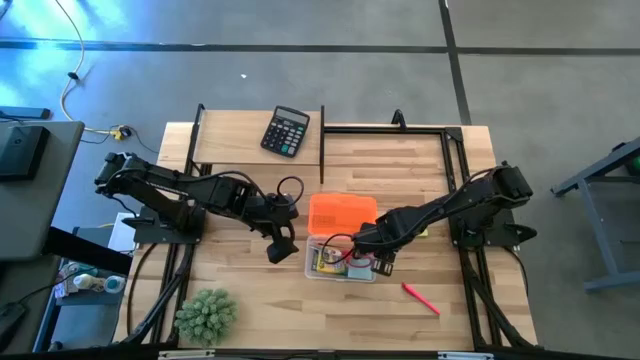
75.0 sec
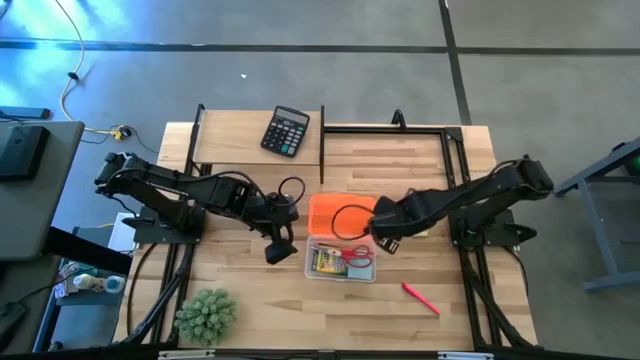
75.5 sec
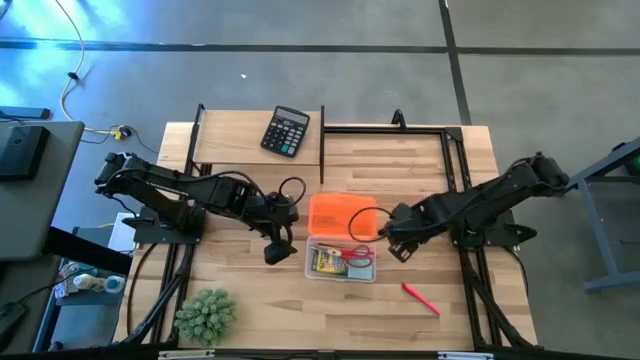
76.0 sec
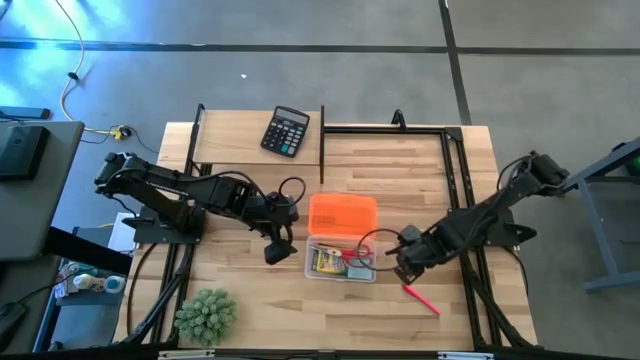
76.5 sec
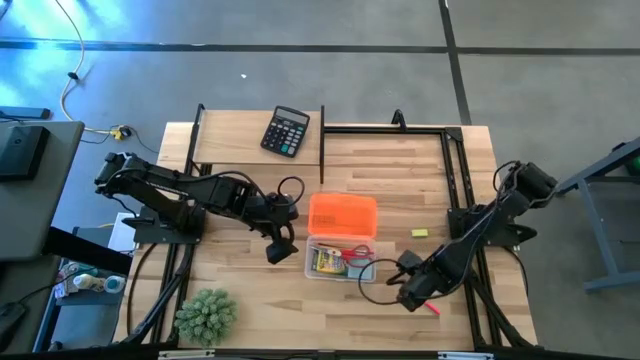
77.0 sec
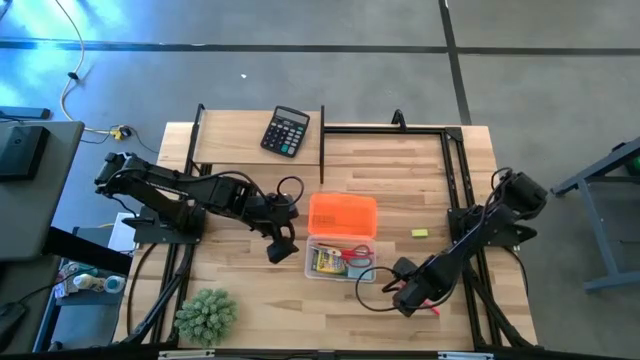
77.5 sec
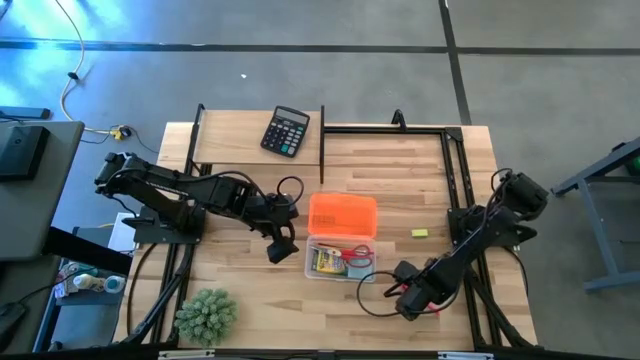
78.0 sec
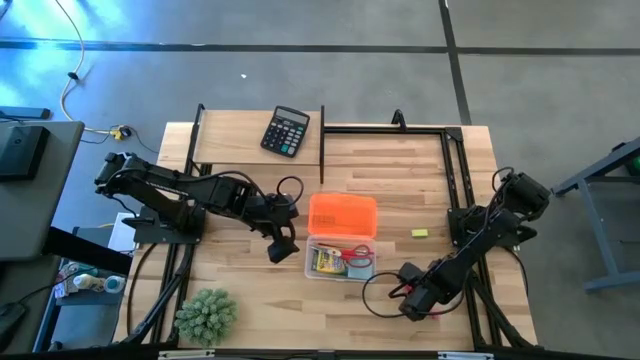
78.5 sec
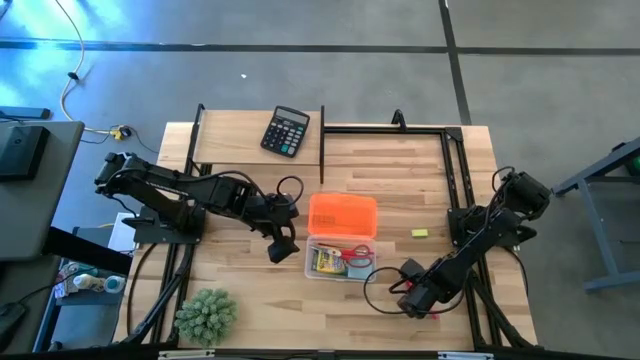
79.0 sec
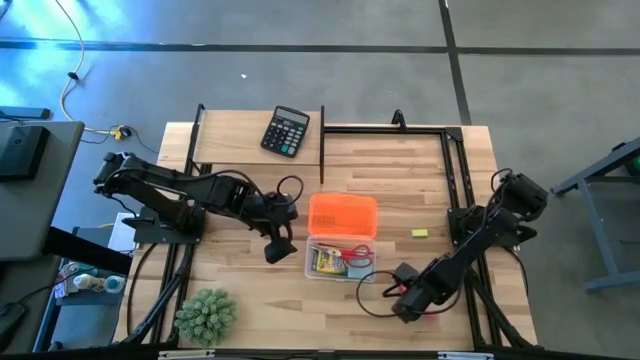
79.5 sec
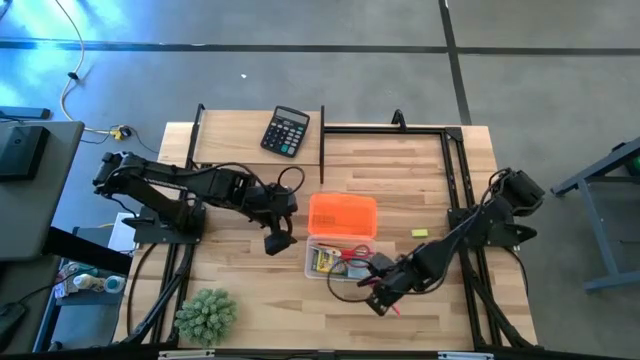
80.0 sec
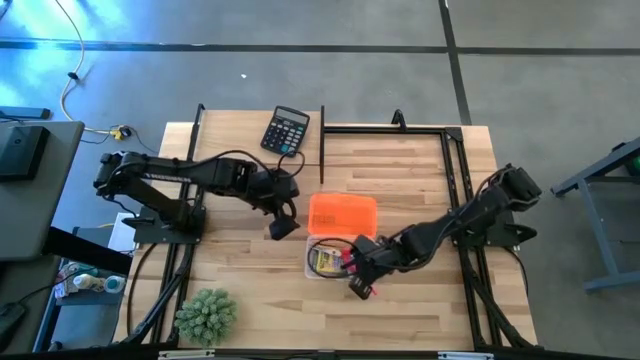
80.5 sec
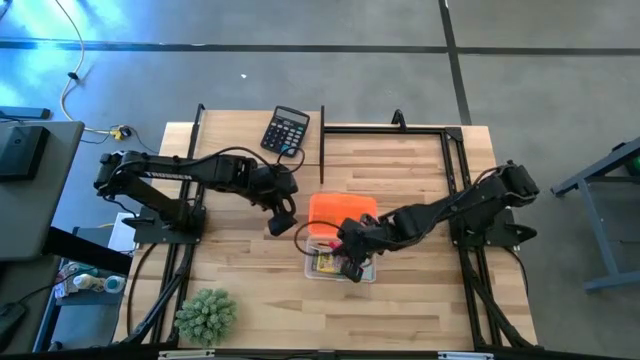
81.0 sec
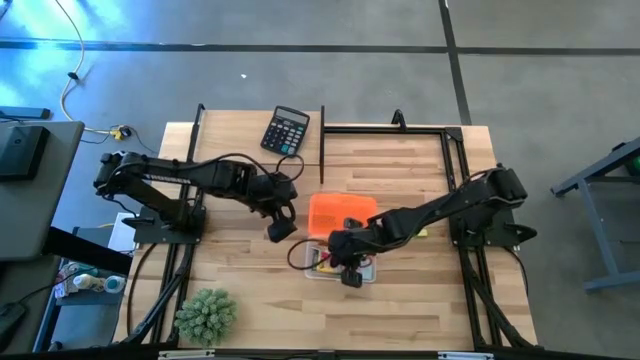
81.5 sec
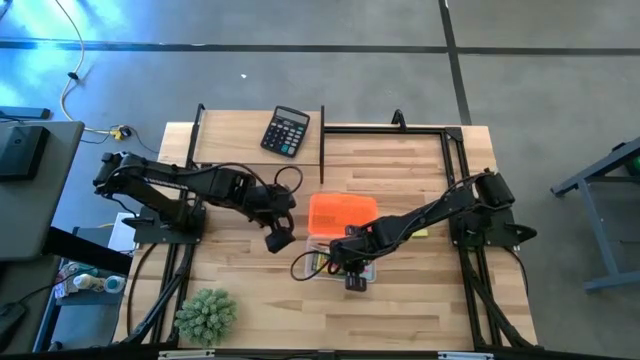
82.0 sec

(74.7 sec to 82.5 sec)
Task: Pack school essentials
Put the pink pen into the supply box

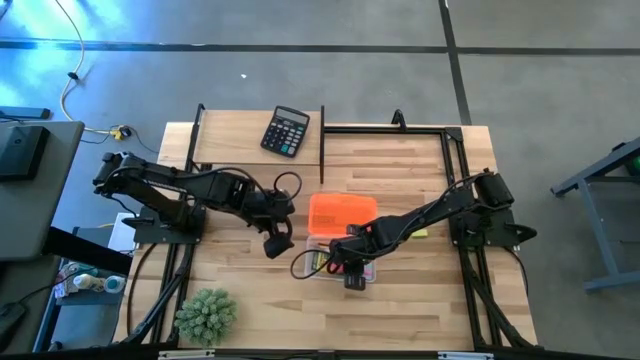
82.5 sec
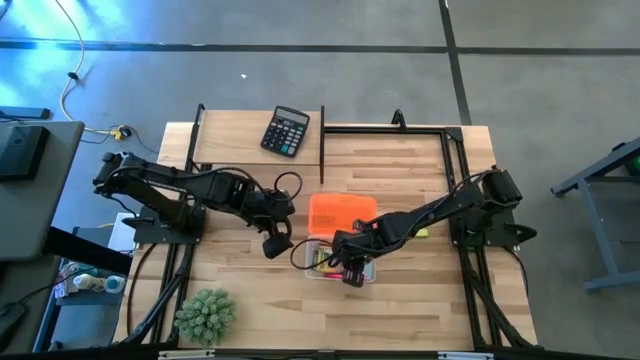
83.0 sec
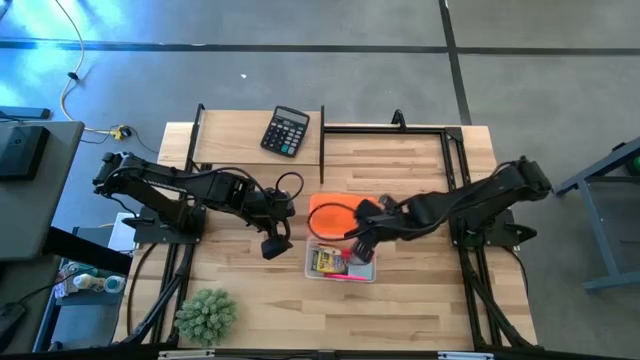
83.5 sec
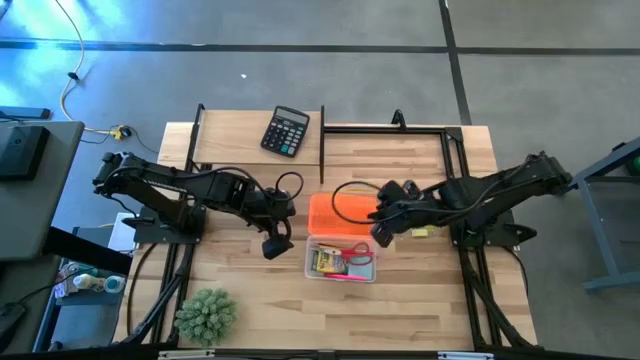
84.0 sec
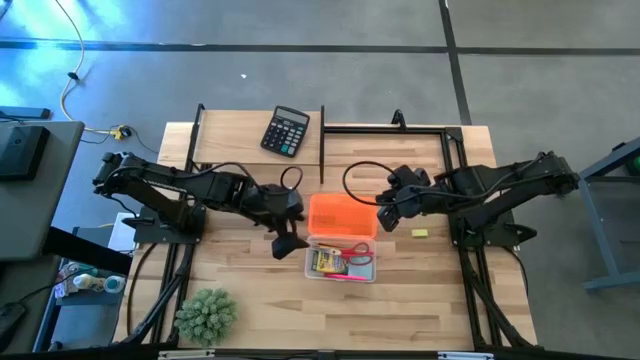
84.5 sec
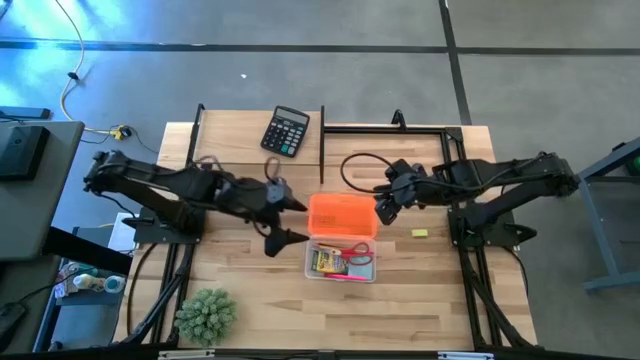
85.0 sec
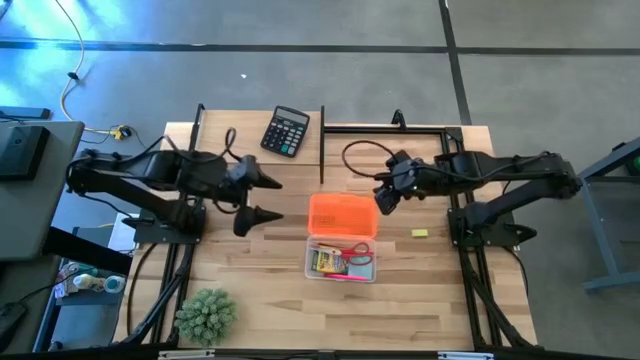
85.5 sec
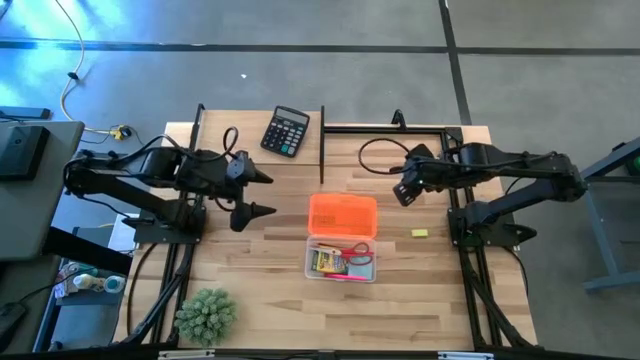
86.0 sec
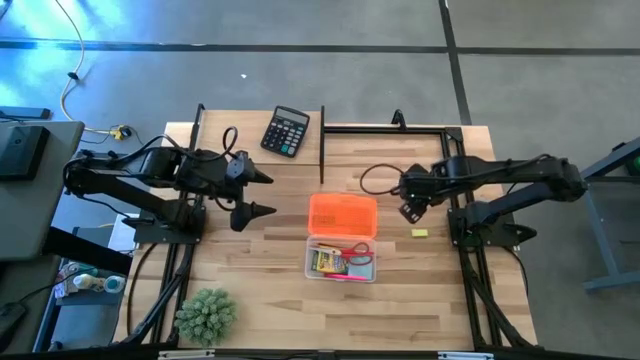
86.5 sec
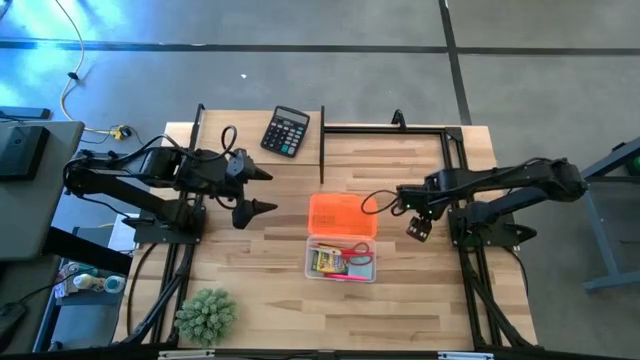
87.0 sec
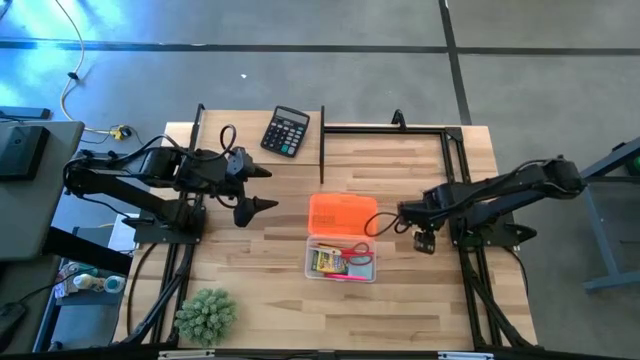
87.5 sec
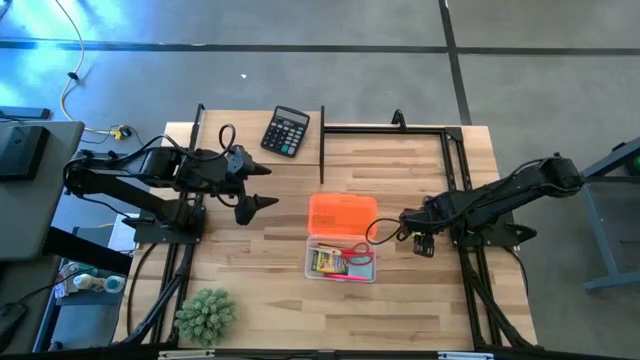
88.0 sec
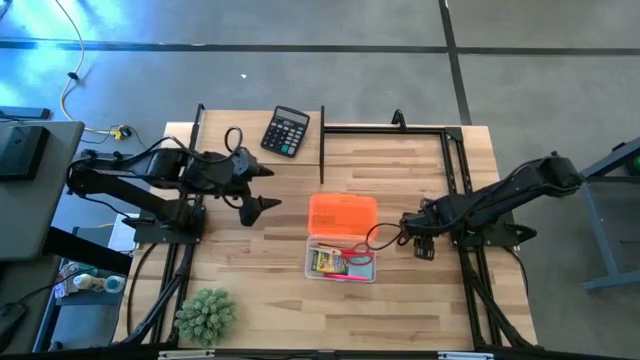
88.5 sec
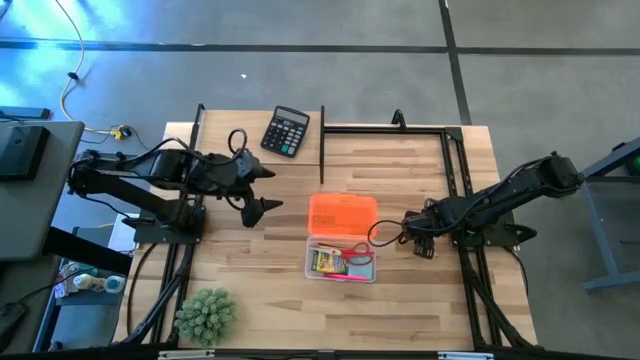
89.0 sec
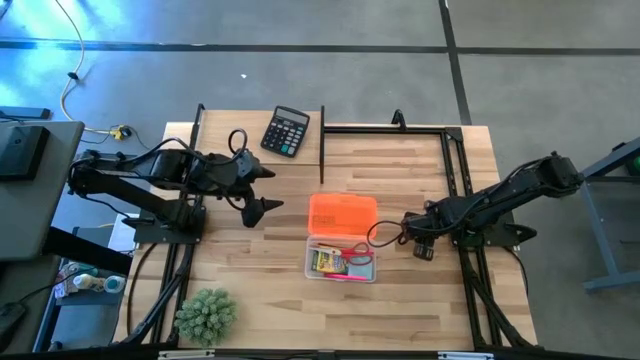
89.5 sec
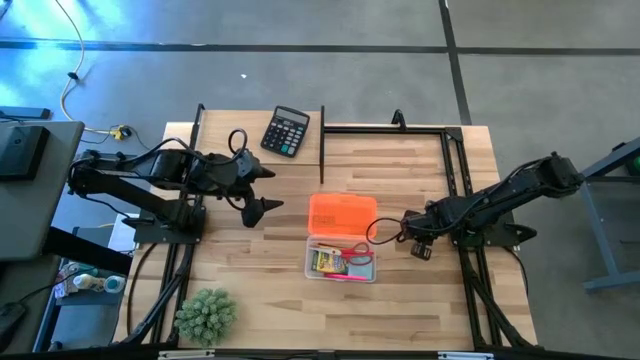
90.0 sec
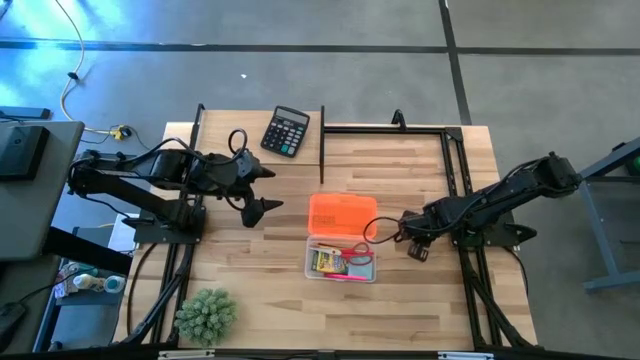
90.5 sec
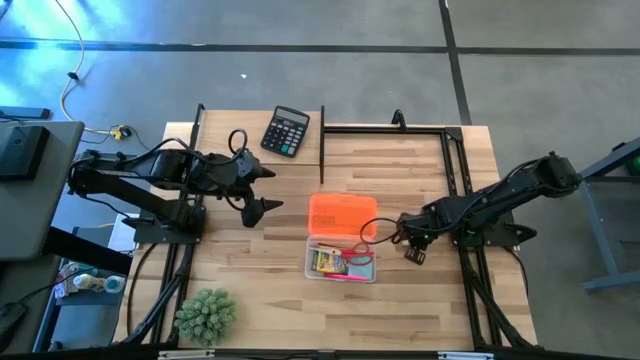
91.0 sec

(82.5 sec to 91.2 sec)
Put the yellow eraser into the supply box

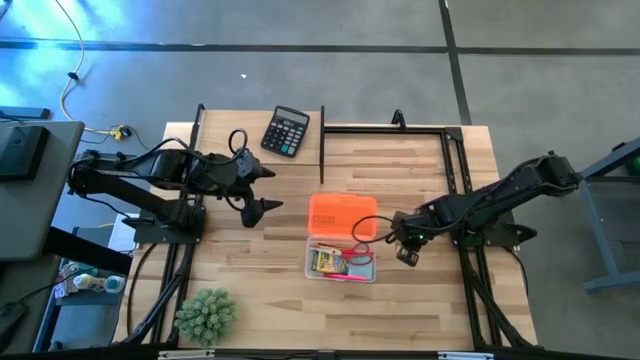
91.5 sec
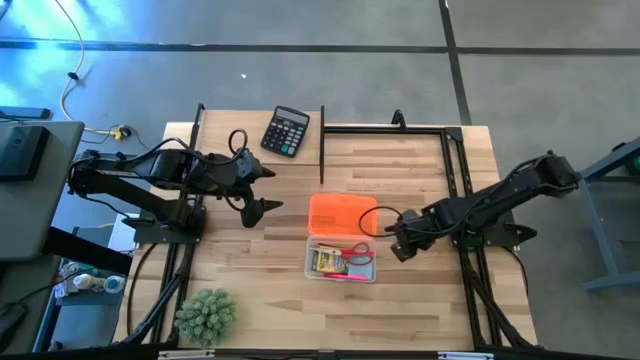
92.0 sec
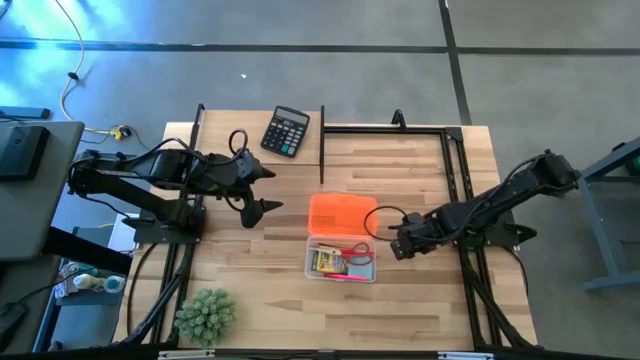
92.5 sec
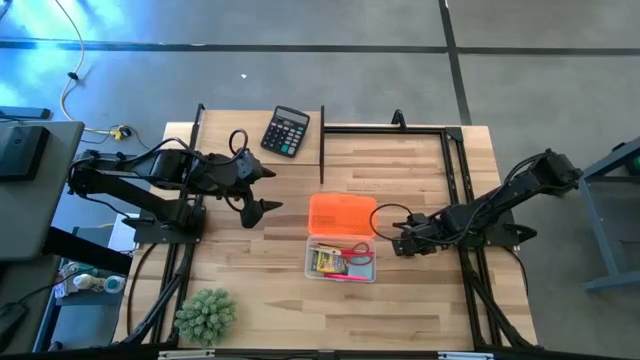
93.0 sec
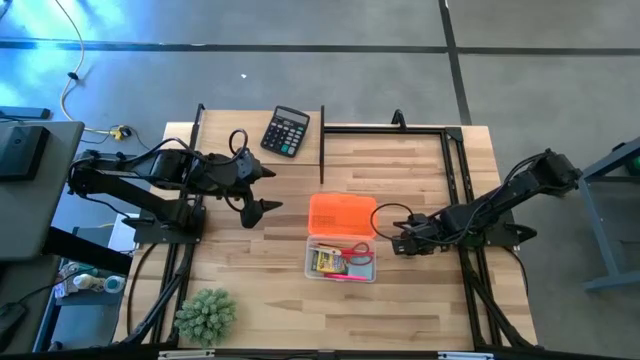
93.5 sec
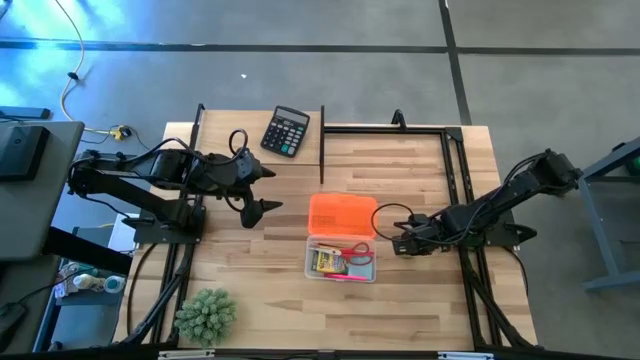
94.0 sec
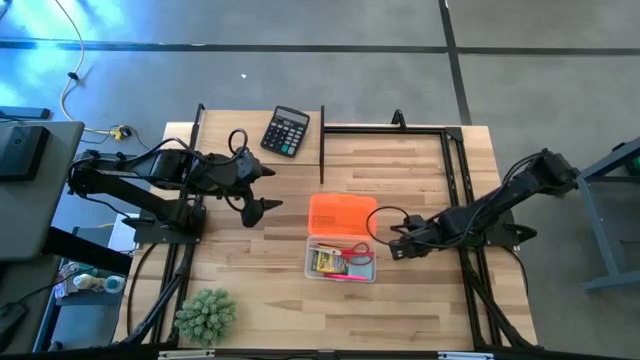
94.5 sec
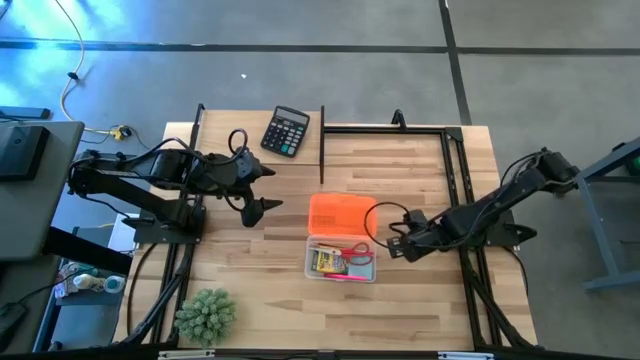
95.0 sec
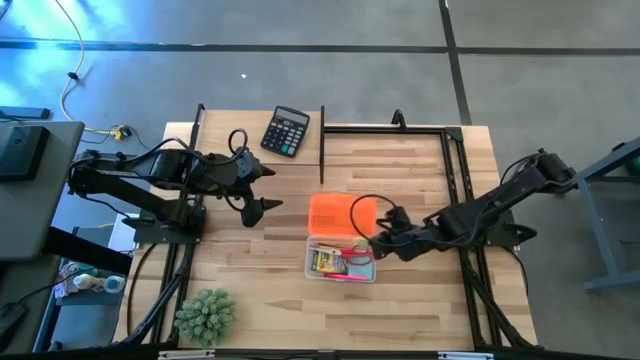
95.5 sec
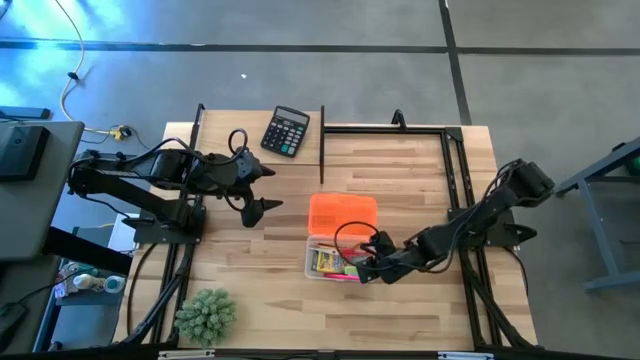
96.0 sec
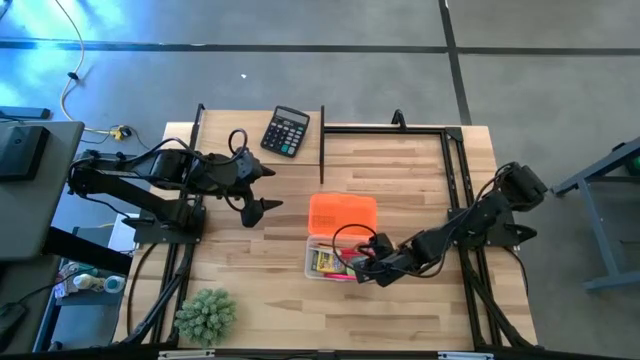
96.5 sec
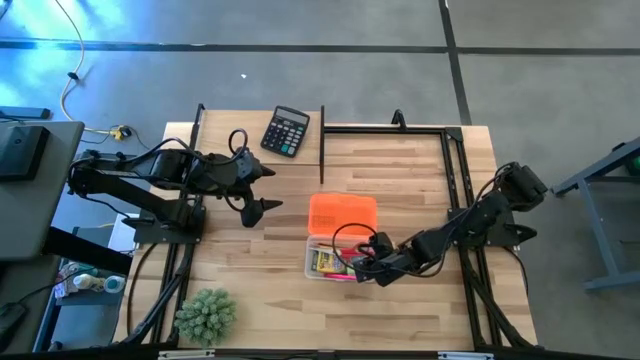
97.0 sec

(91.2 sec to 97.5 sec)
Put the yellow eraser into the supply box
